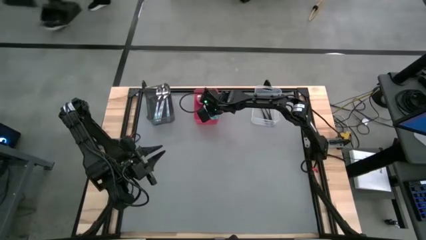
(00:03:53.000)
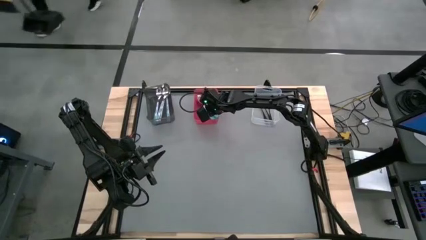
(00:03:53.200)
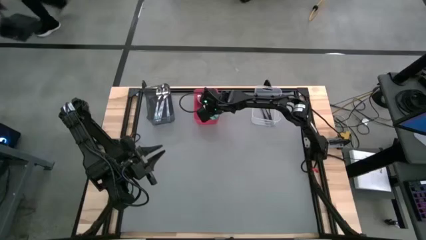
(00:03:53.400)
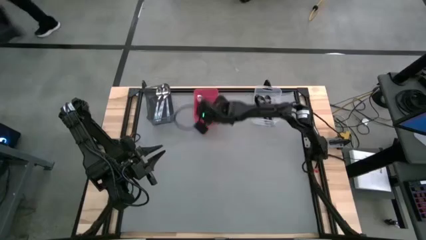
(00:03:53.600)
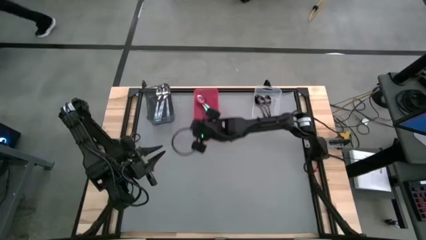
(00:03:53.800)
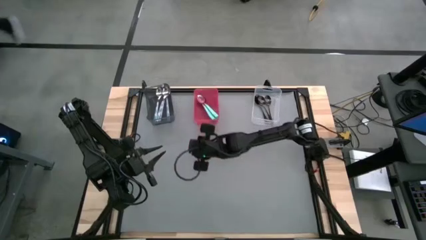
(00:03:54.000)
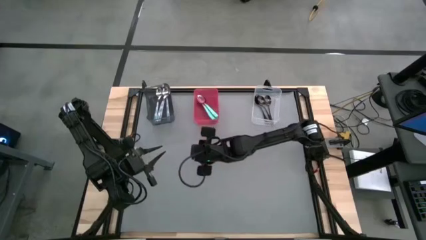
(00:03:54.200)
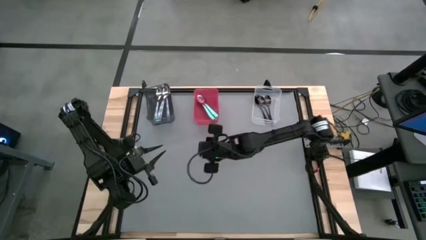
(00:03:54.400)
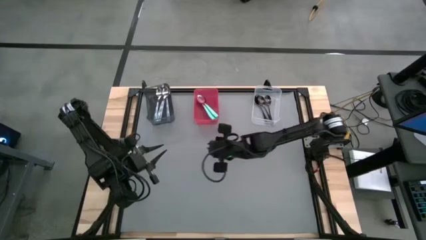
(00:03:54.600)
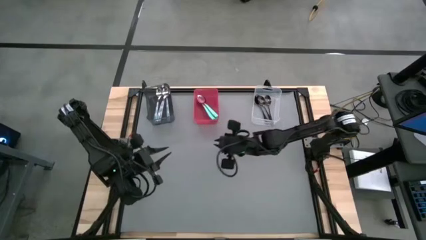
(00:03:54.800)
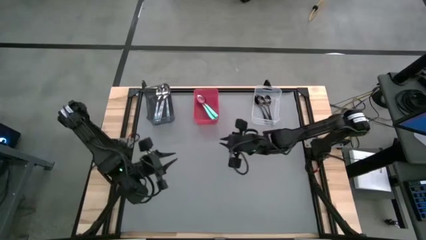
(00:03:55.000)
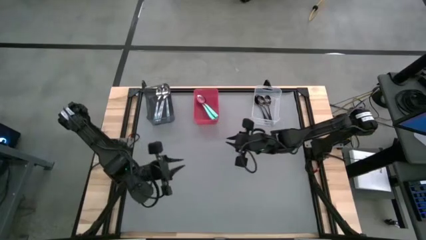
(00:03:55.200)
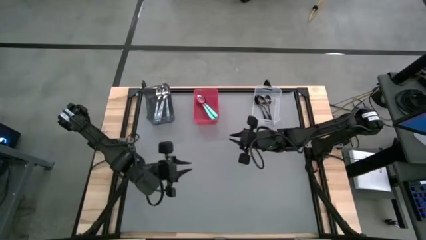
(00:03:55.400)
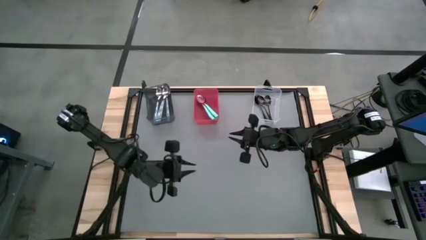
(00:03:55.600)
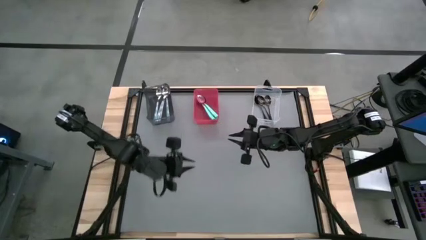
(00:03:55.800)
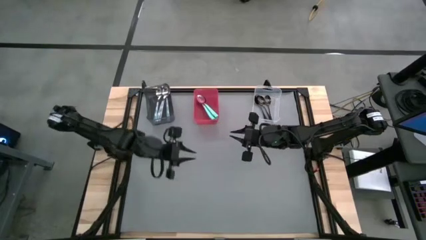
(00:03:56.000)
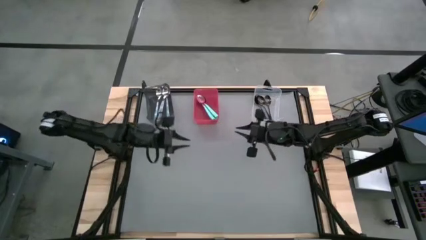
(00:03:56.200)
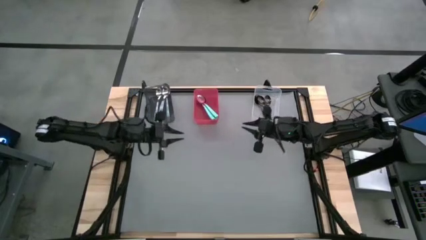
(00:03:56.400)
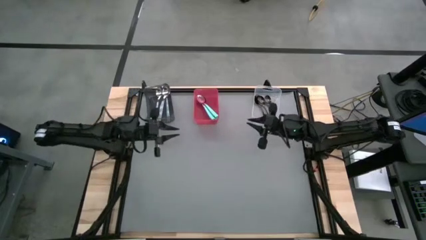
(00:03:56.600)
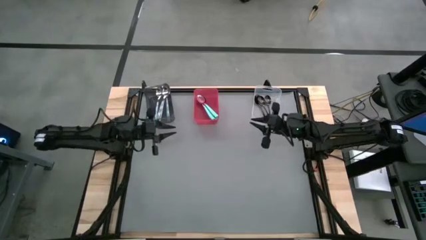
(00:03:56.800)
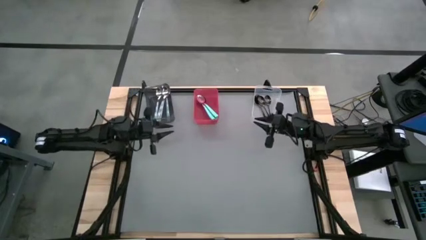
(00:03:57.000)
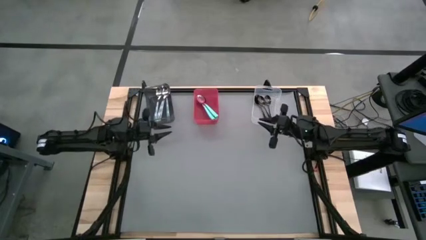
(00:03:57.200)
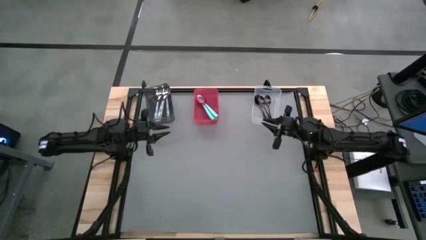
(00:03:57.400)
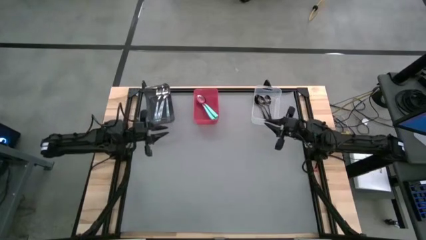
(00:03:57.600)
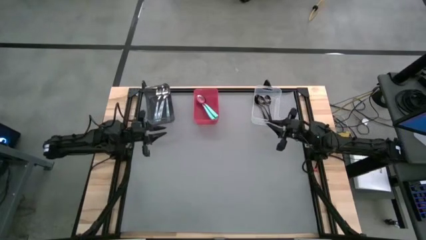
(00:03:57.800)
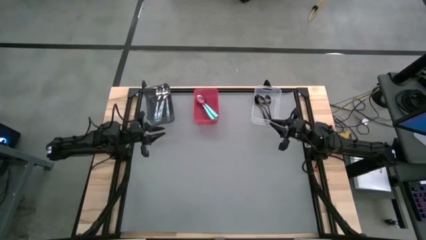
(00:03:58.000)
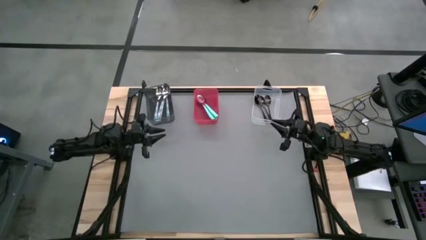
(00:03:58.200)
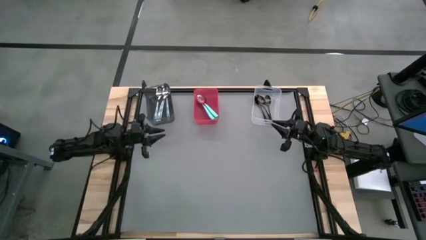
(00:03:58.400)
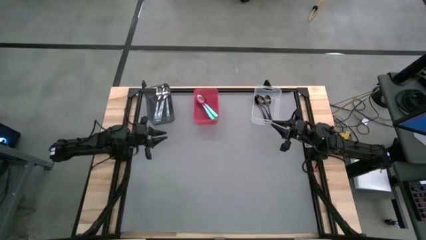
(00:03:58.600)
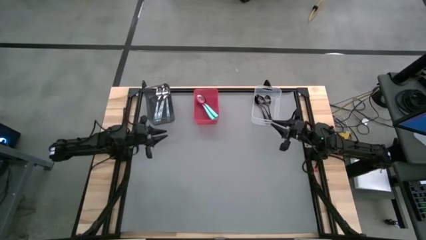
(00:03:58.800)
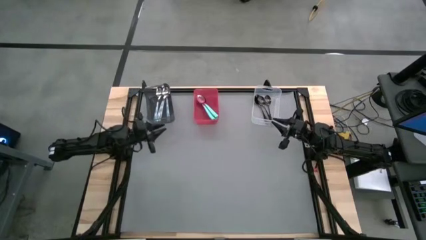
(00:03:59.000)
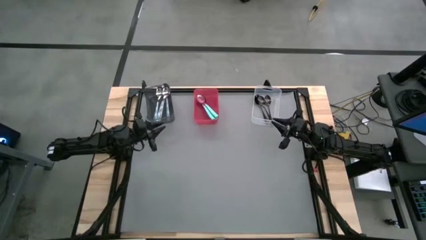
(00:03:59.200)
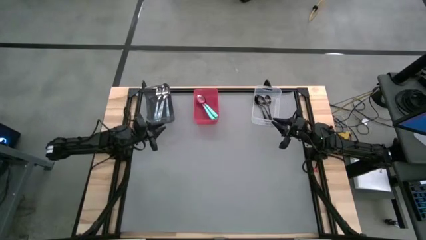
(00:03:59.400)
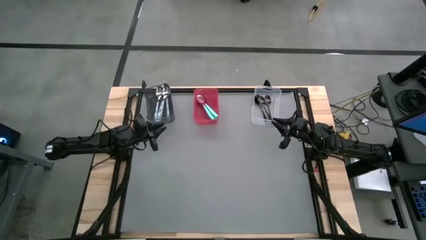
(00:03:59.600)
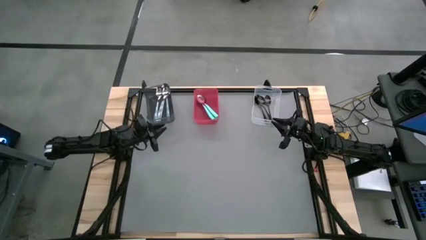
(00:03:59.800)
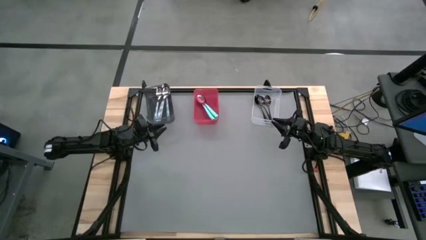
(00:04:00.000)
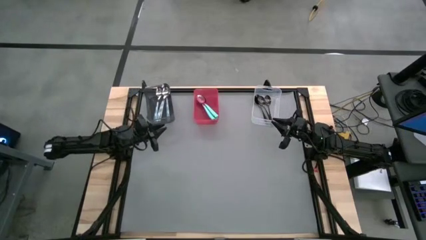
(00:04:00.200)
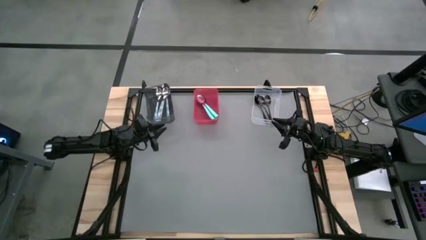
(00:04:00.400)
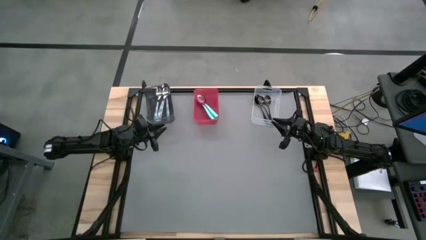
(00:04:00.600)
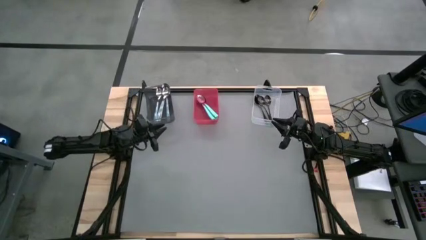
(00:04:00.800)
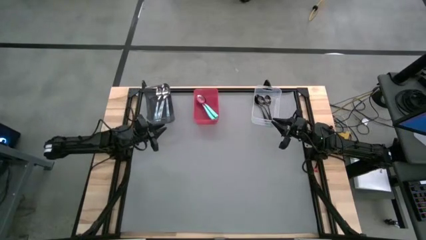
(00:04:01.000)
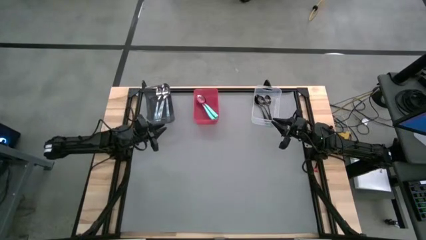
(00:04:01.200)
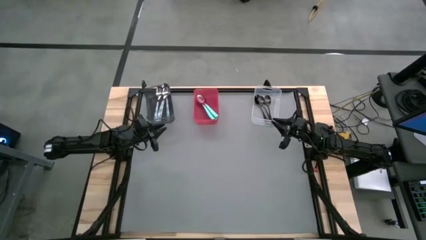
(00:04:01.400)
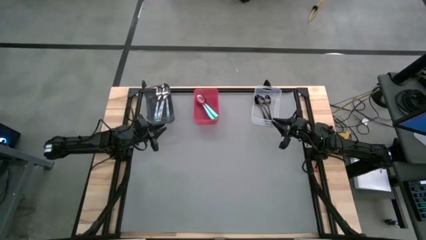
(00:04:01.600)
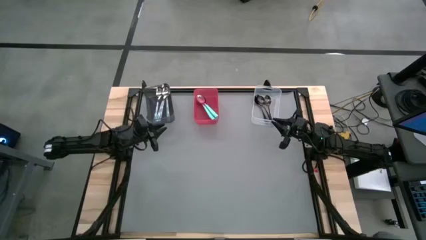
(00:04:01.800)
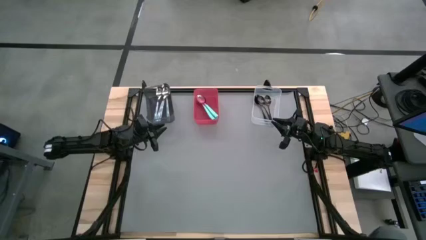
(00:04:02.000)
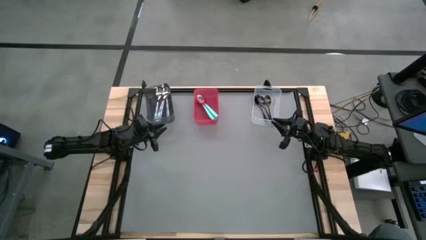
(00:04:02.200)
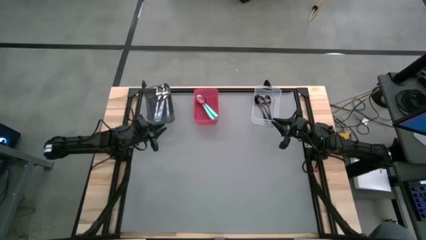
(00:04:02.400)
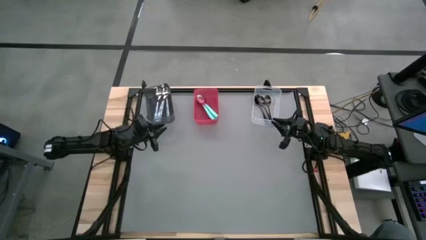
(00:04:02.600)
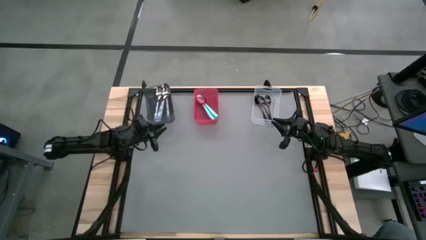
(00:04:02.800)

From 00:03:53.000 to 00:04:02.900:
Task: Sort silverware by color (type)
Return to Home Position

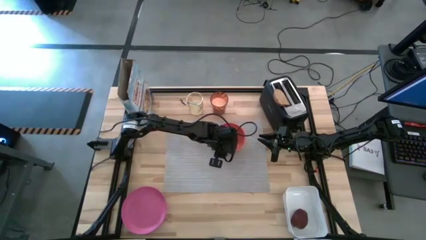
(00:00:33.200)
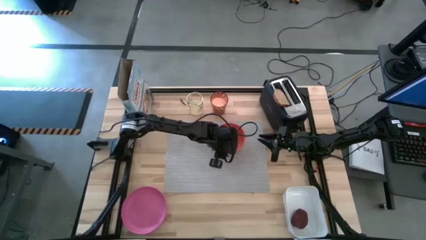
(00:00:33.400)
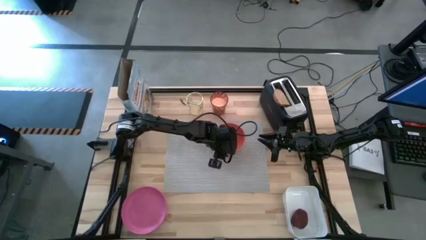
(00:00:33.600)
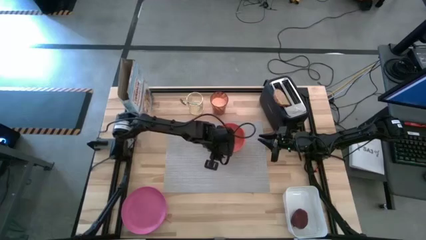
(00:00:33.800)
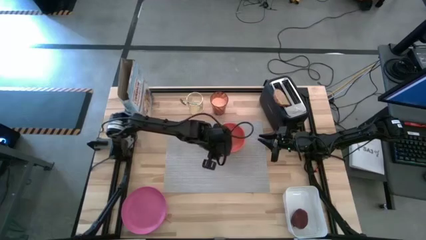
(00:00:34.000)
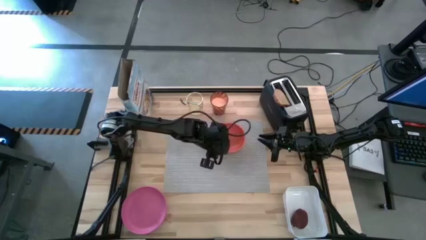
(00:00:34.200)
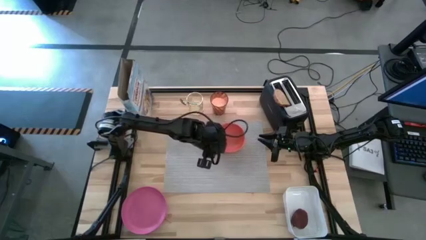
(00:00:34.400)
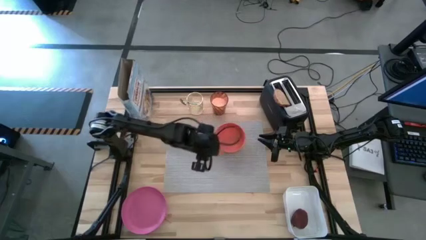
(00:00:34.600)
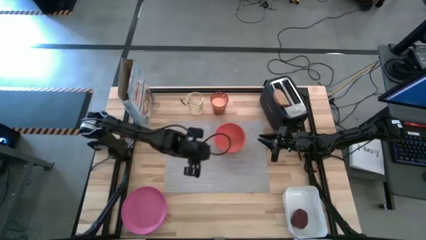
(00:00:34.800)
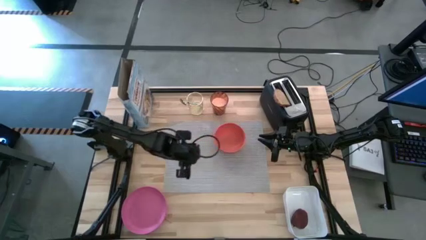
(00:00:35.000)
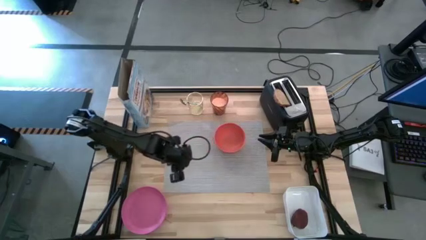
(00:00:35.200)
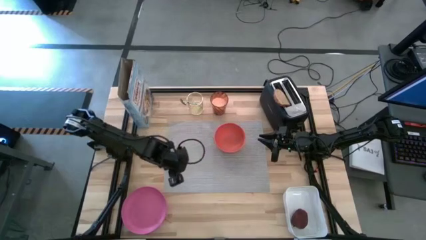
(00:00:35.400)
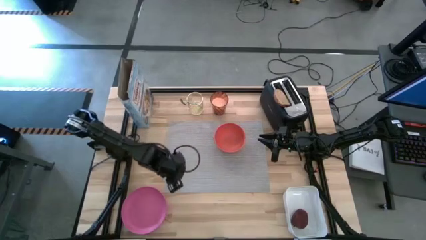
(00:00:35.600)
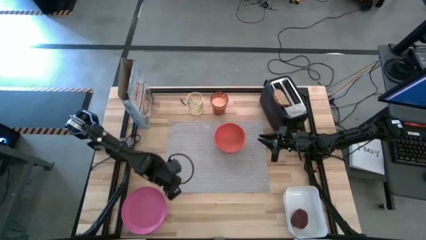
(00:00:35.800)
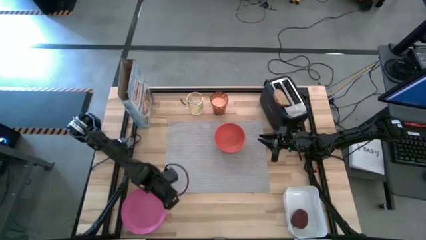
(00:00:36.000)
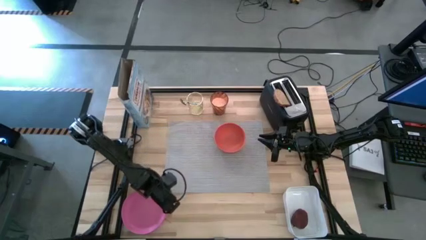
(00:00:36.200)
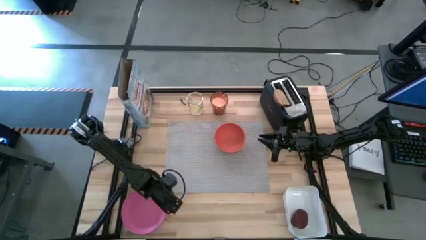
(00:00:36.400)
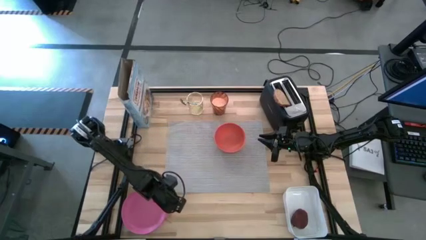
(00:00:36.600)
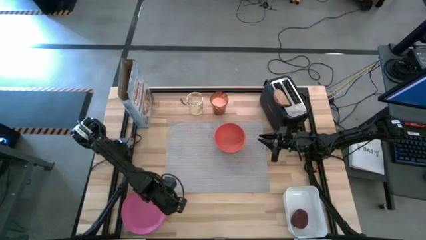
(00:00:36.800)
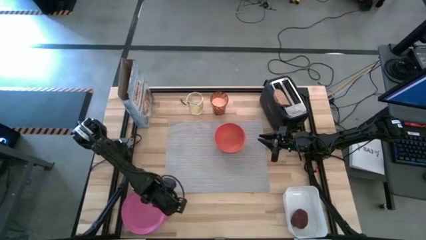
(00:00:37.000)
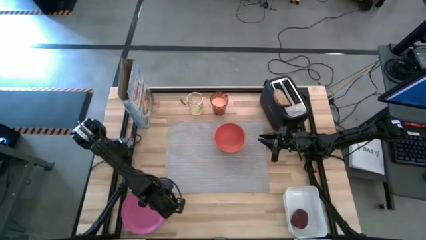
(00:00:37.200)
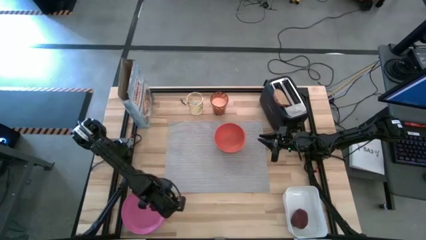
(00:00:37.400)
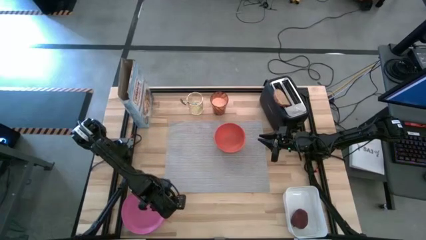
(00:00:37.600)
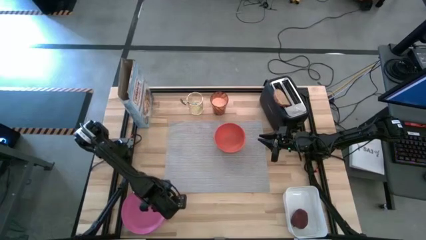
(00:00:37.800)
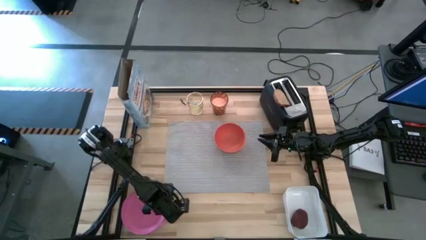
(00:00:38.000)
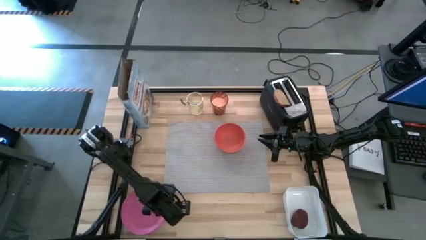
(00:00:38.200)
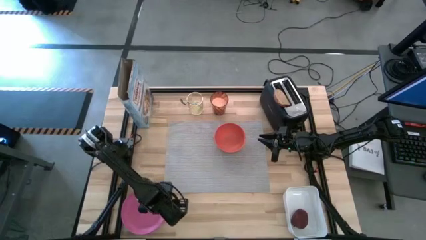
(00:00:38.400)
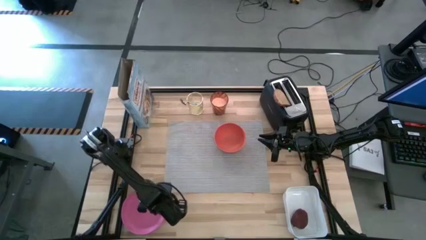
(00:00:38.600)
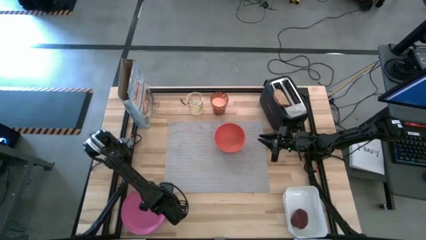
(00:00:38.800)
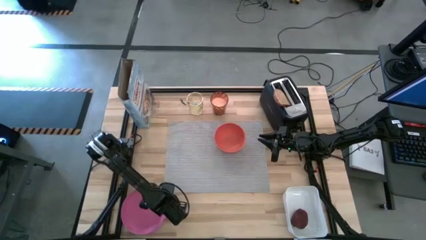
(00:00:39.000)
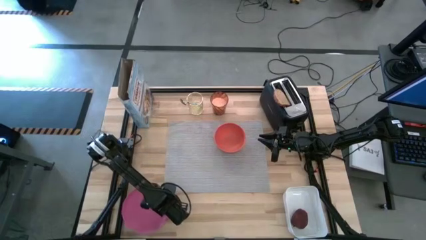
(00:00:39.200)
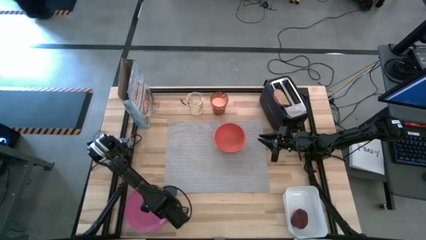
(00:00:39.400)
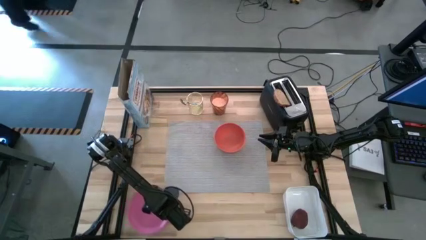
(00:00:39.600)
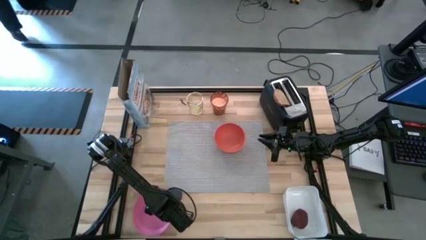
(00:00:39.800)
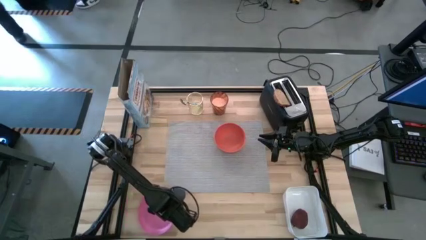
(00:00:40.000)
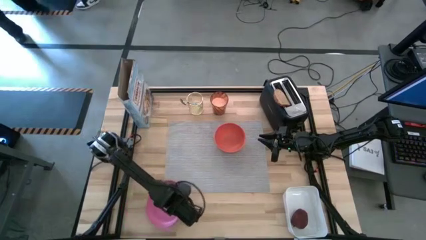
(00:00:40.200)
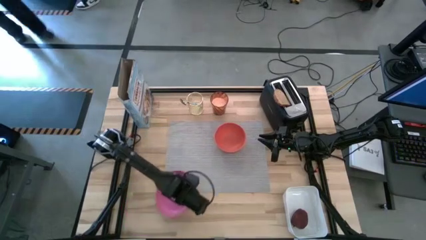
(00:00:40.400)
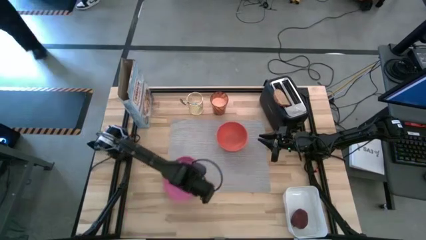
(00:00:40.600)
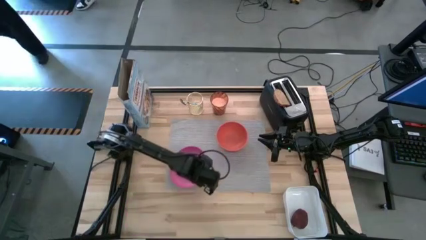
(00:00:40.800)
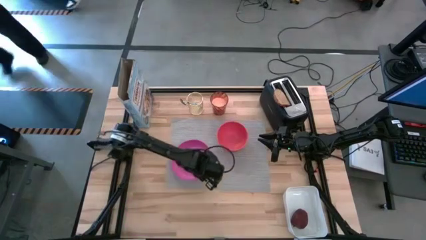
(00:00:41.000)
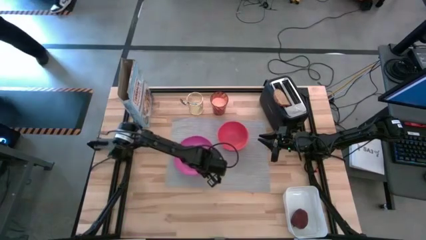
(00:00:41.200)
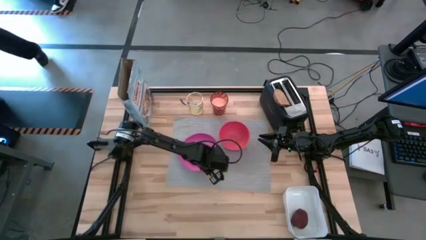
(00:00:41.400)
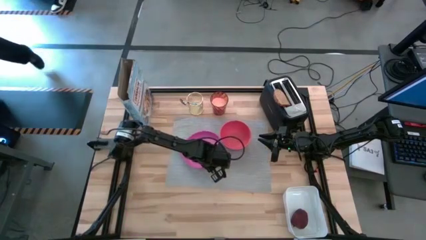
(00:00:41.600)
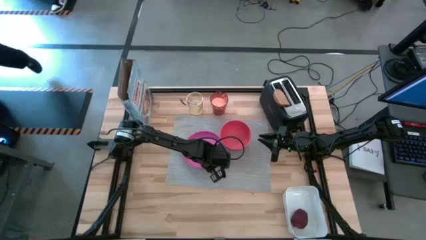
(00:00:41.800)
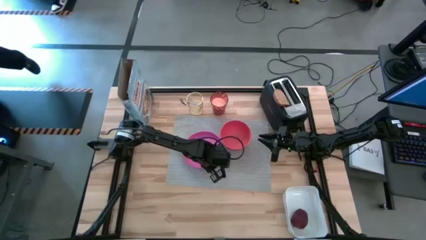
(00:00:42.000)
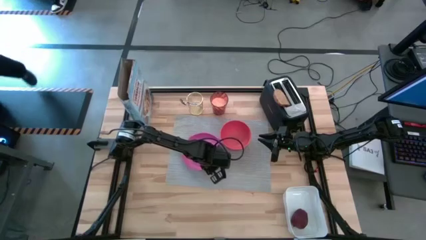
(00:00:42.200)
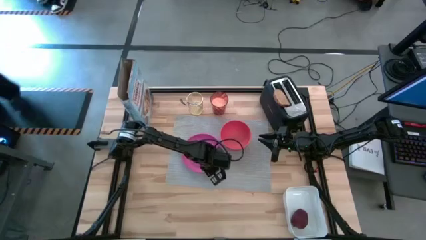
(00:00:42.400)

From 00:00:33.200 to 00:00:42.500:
Task: Arrange a breakfast setting
Put the pink plate on the gray placemat
